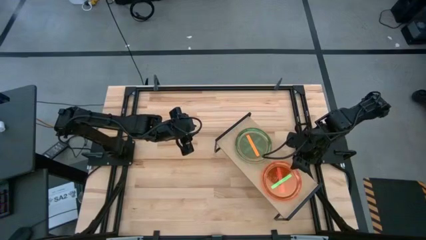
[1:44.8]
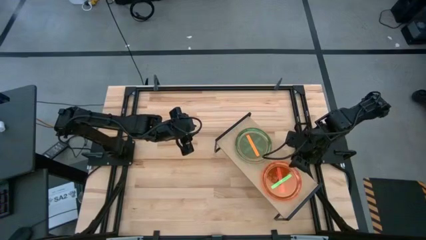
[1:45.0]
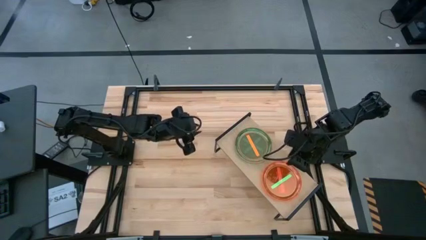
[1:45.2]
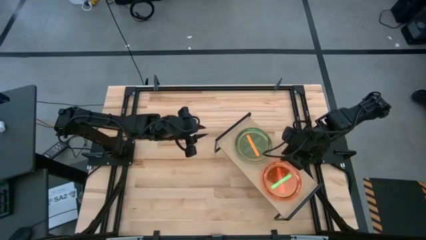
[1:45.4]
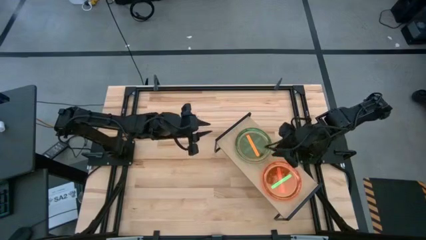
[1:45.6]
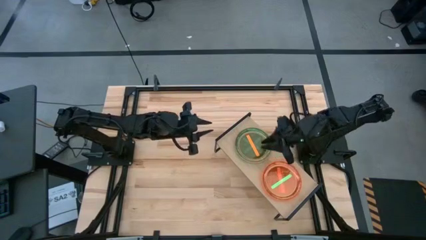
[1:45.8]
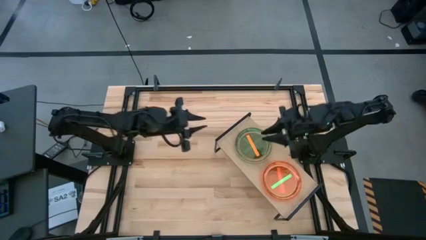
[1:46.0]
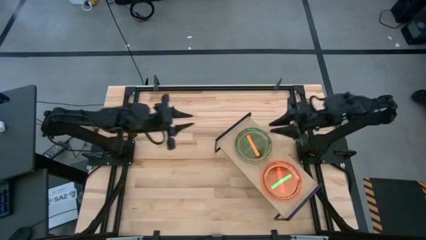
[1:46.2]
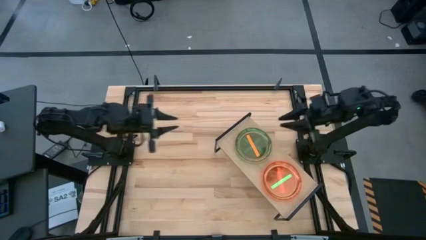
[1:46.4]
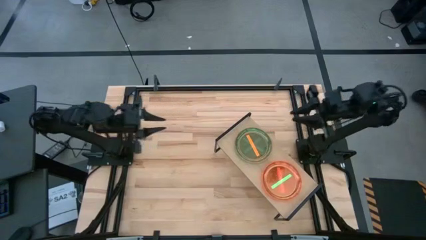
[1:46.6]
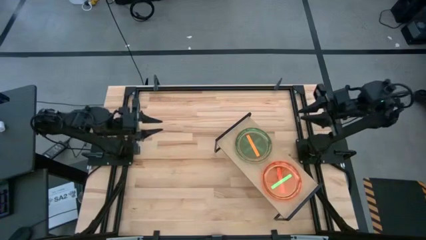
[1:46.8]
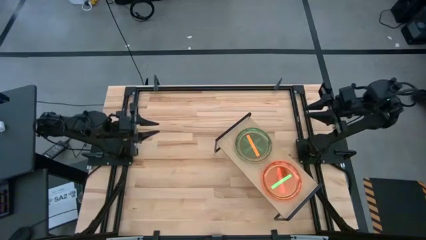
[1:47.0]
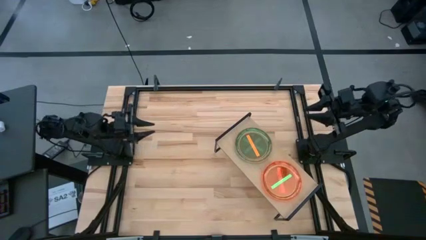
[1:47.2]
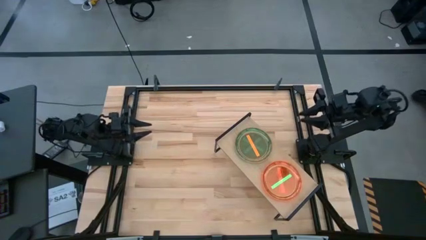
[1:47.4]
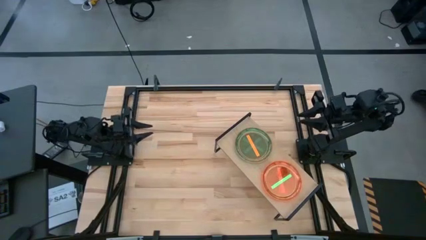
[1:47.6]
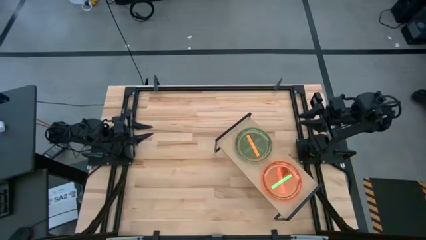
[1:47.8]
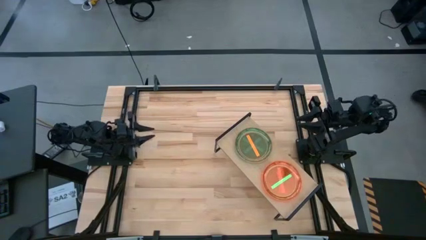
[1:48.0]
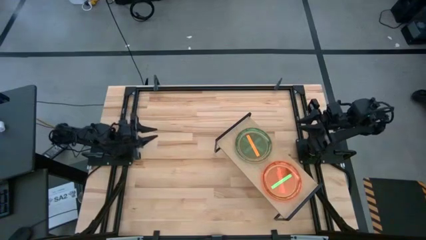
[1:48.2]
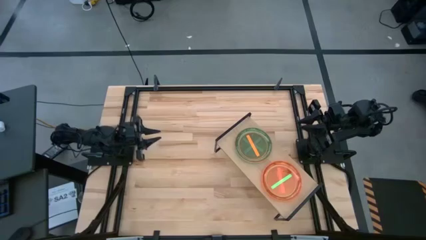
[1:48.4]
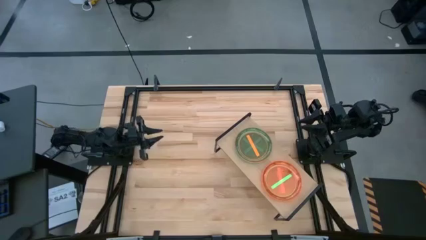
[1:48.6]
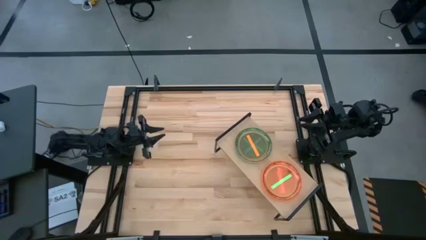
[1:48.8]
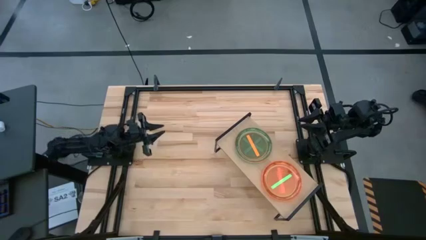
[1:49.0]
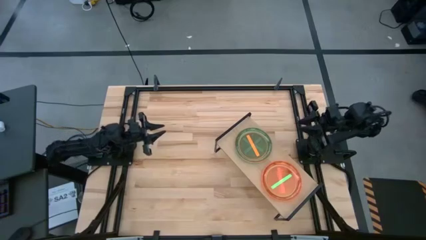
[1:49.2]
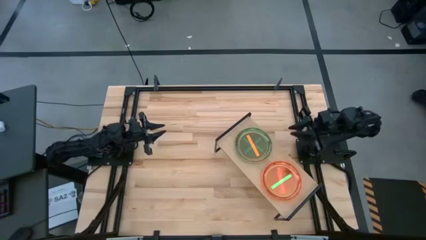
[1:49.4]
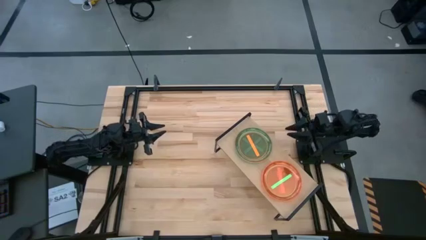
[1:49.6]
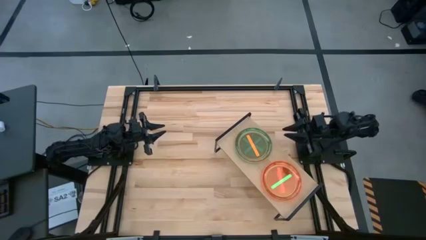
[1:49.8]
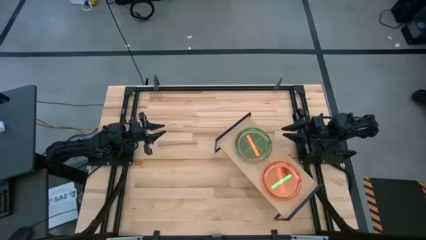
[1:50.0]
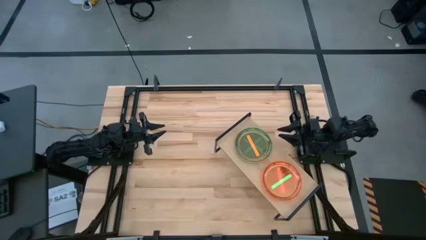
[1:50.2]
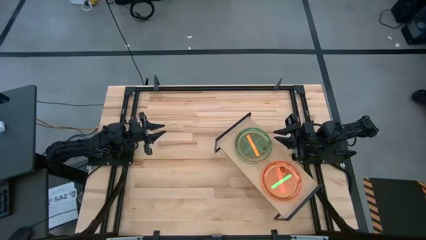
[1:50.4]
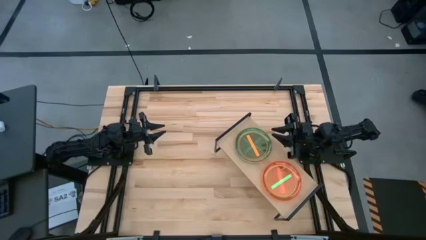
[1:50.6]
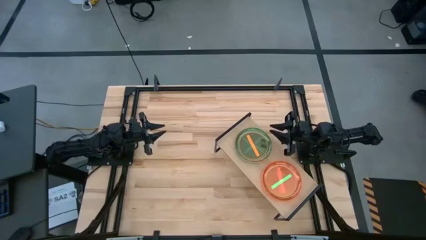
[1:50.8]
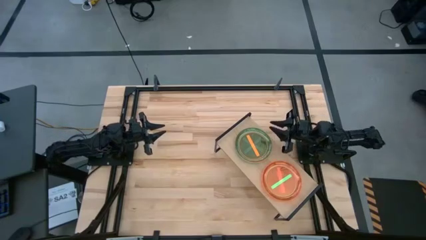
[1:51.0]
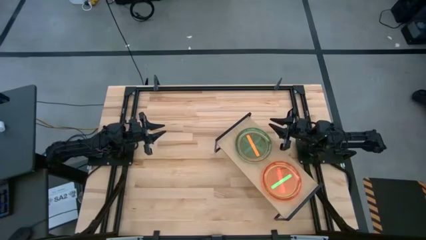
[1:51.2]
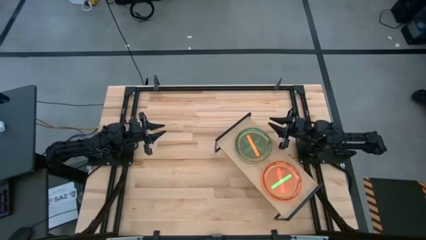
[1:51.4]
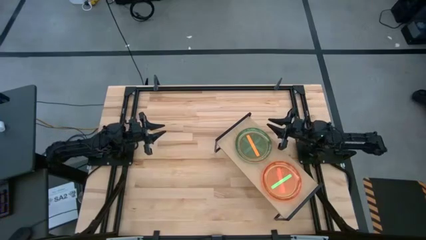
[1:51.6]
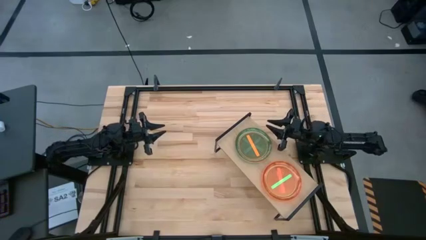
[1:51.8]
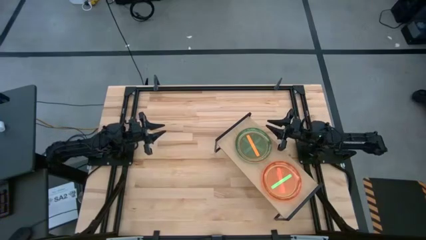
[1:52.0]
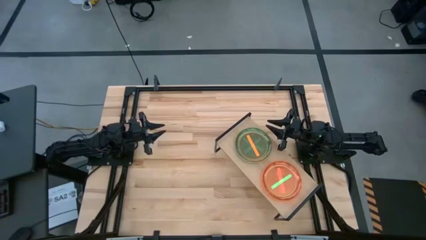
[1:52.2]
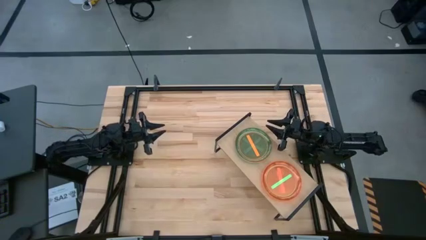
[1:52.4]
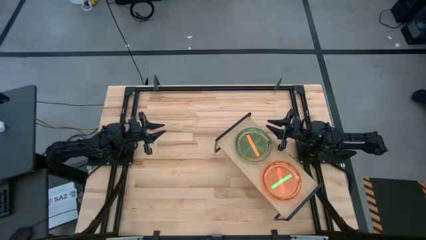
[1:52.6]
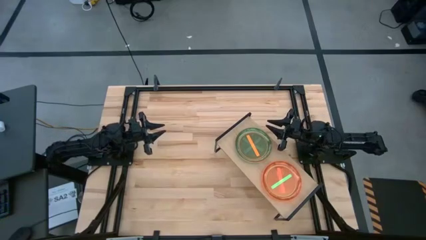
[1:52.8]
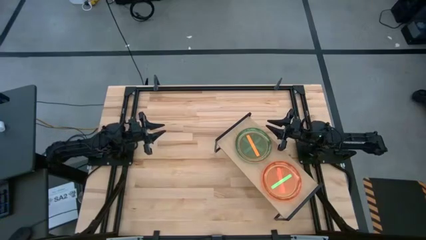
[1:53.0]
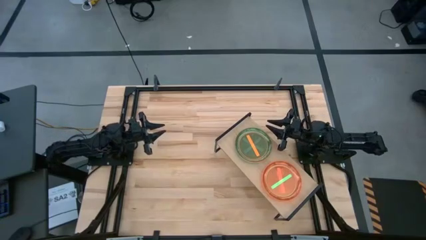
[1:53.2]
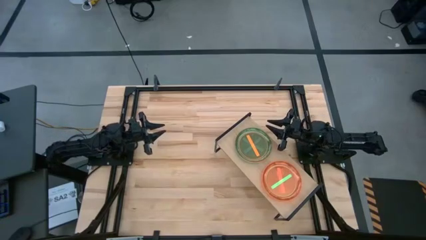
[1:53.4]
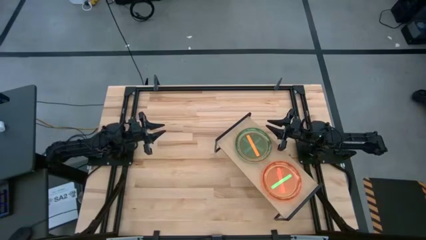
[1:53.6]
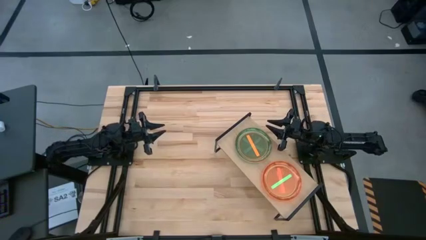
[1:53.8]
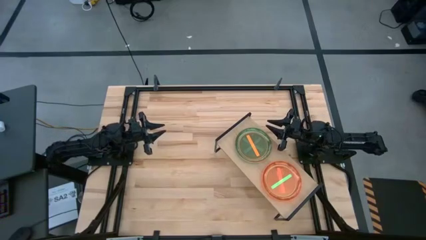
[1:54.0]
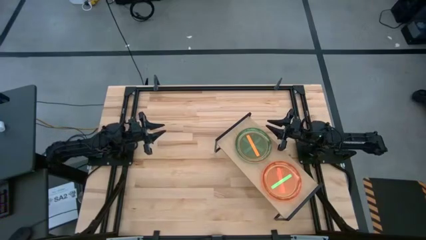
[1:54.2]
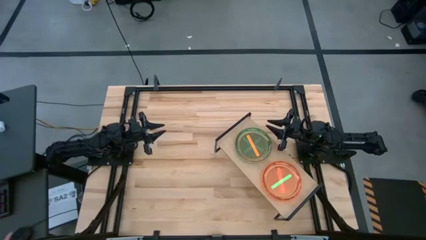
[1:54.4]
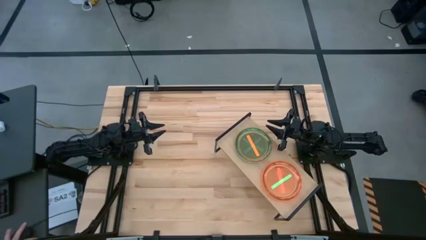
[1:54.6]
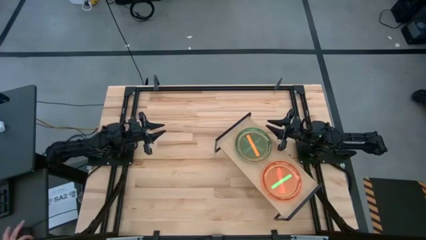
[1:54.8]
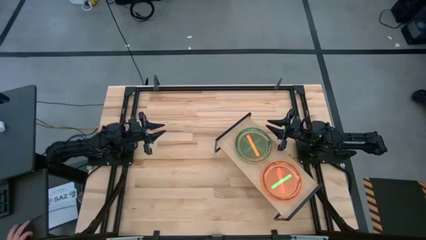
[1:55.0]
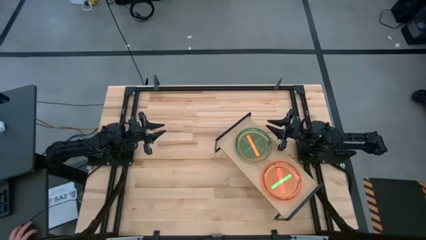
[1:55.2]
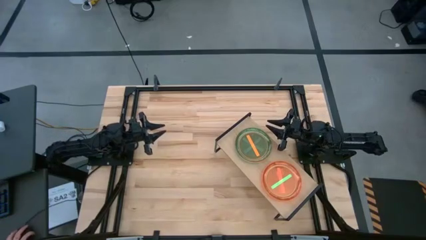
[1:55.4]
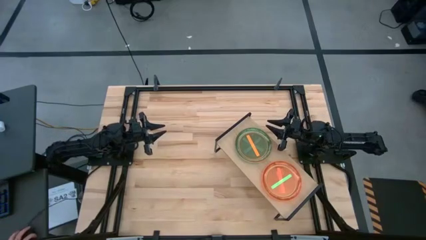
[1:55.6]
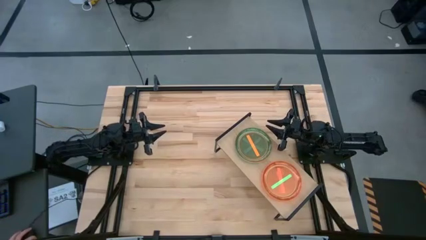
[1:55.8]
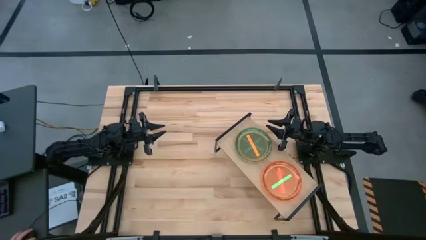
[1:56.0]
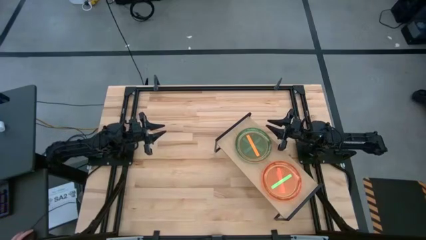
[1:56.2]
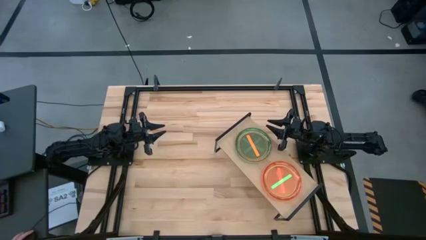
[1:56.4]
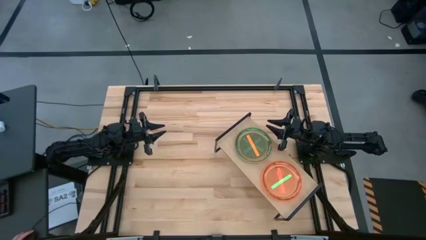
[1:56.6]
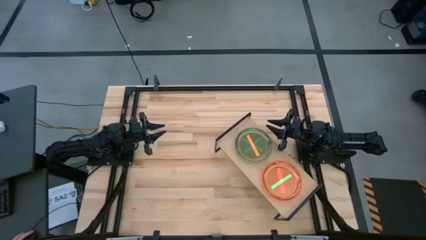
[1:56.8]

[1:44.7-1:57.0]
Task: Place and stack plates onto a shelf
Return to Home Position

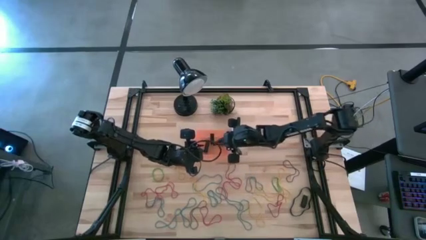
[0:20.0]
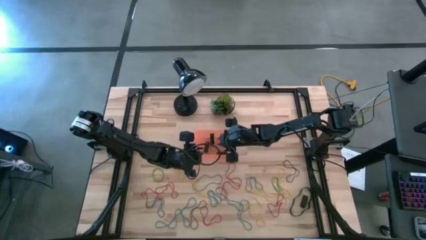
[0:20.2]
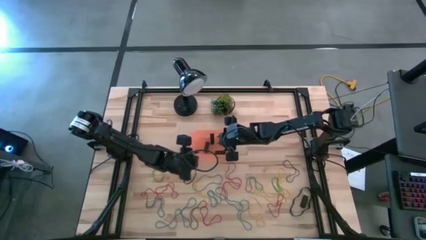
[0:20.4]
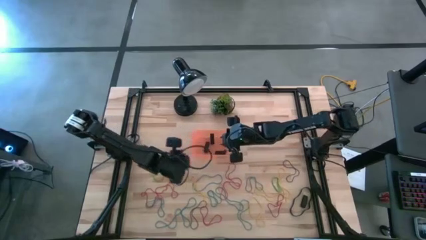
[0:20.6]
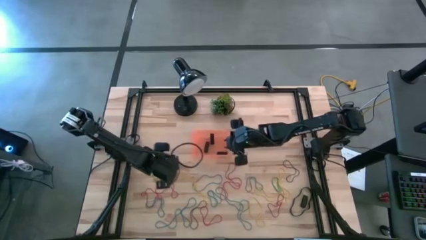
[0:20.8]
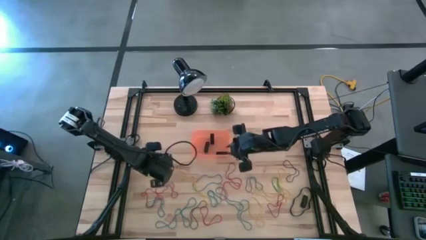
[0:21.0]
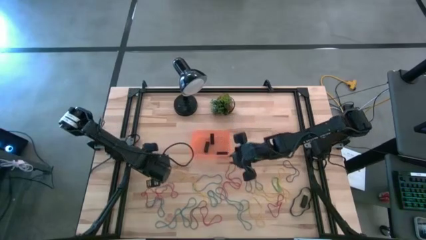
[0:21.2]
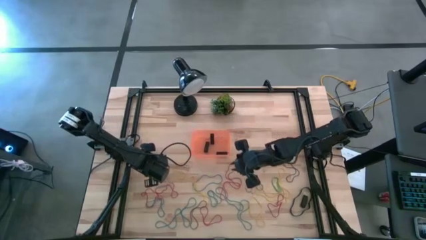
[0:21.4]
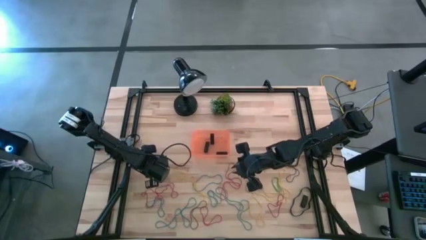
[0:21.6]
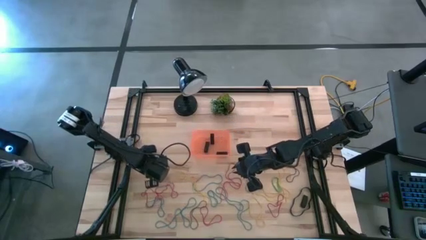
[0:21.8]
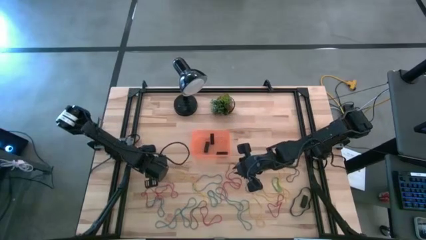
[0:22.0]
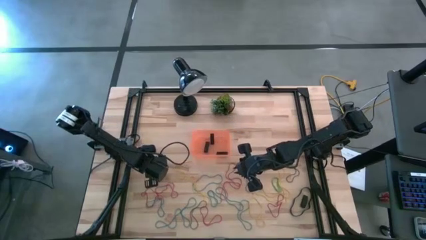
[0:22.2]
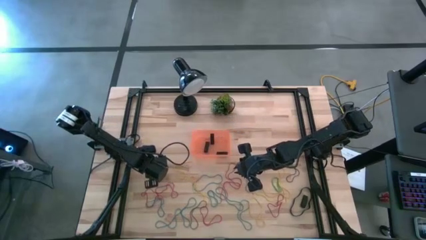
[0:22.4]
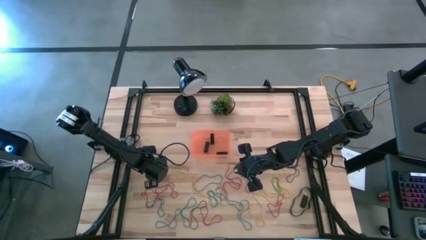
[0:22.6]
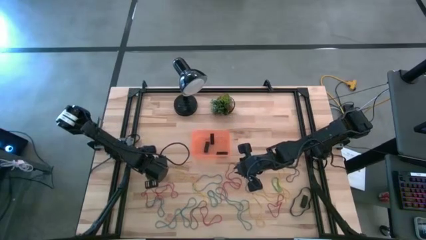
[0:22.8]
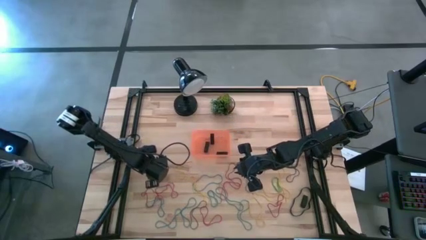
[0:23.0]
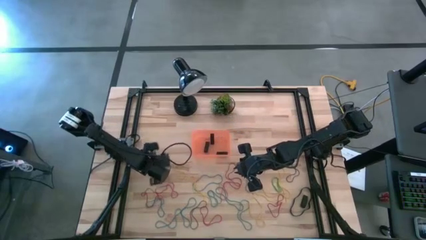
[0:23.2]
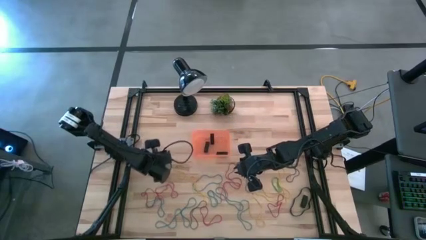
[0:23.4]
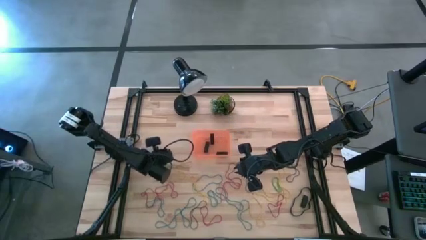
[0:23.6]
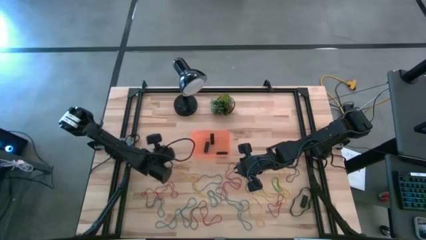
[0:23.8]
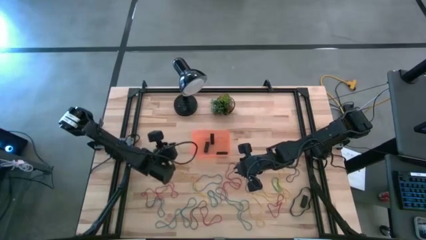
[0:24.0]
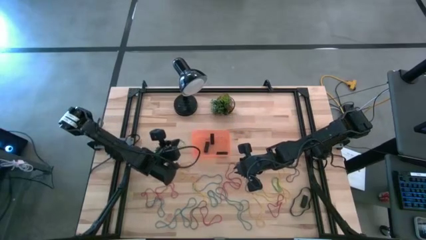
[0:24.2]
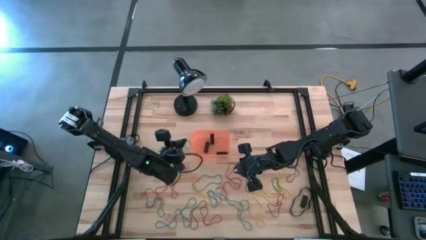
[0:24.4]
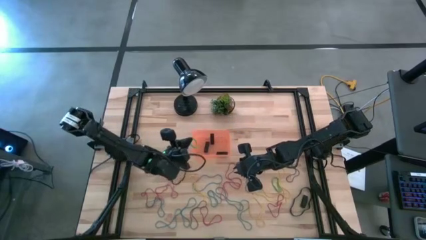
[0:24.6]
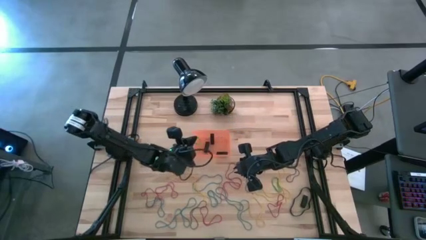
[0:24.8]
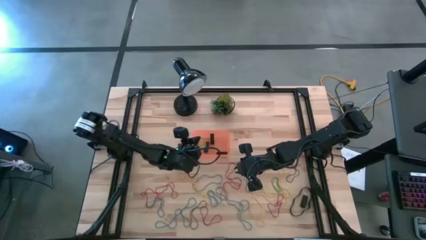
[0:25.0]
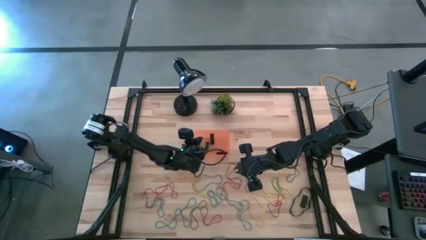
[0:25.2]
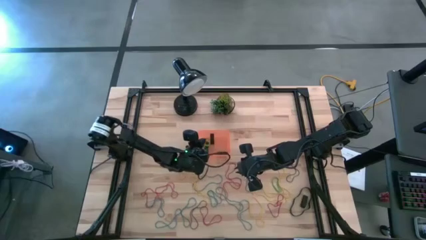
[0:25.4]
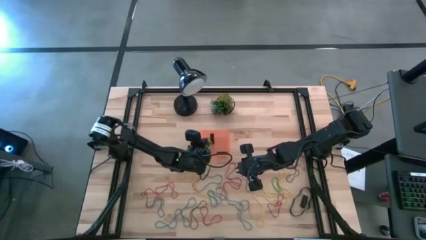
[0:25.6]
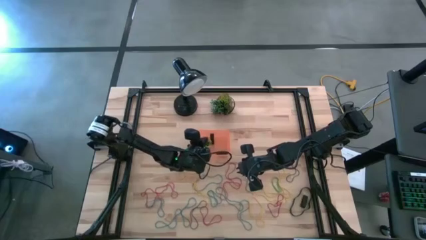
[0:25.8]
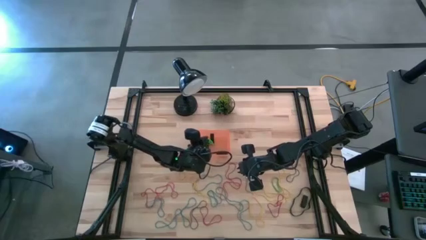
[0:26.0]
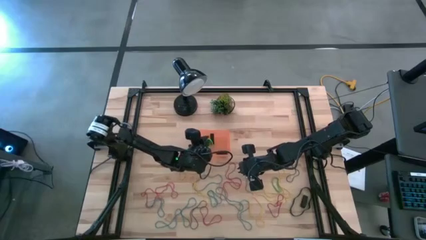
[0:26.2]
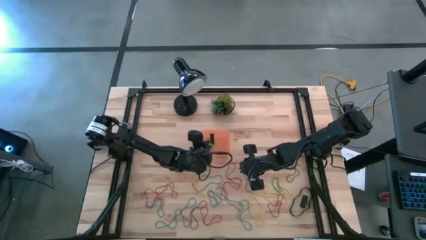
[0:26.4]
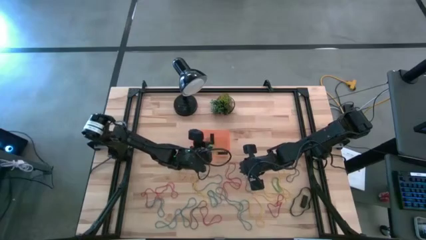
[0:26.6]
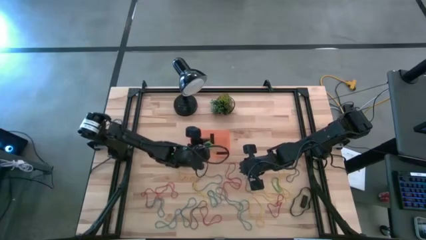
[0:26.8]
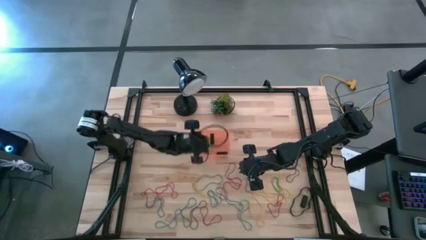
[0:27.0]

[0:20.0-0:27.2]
Task: Pick and place rubber bands into bin
Put the green rubberband into the orange bin
